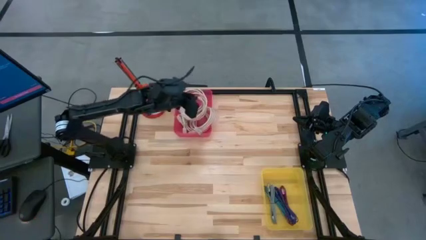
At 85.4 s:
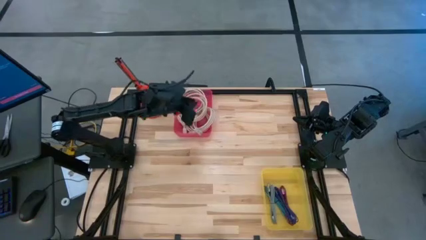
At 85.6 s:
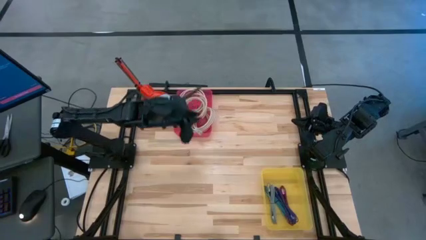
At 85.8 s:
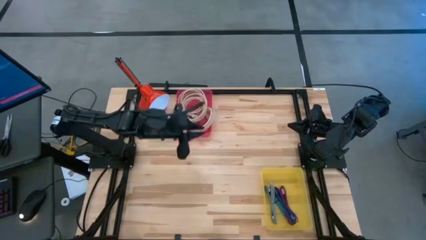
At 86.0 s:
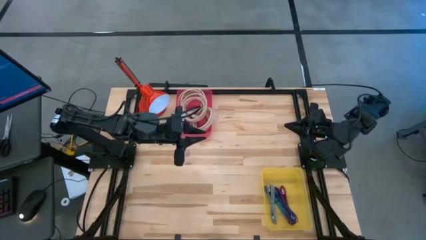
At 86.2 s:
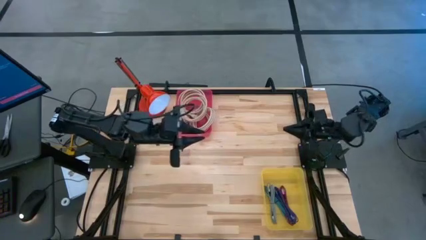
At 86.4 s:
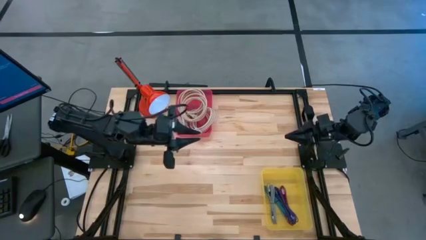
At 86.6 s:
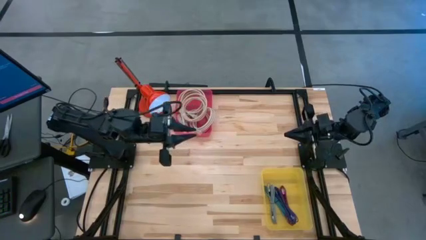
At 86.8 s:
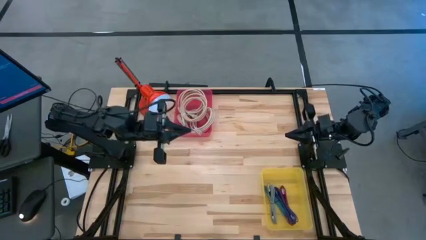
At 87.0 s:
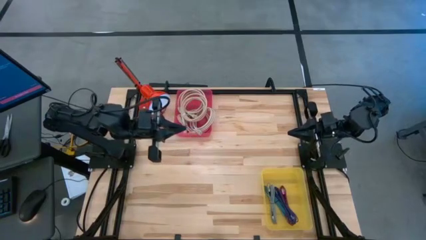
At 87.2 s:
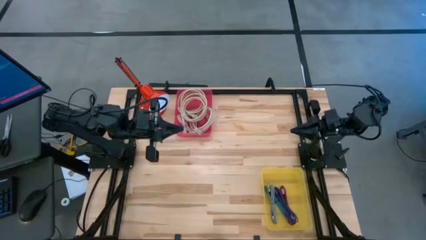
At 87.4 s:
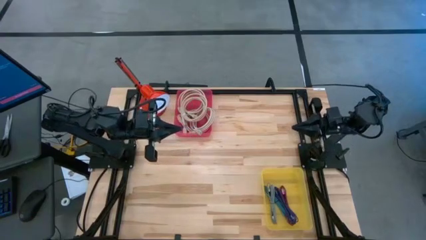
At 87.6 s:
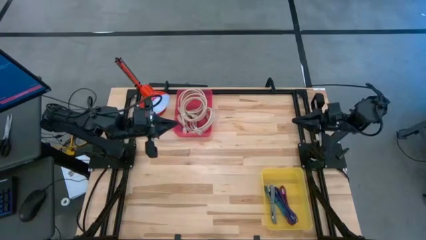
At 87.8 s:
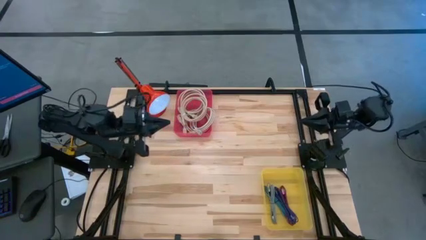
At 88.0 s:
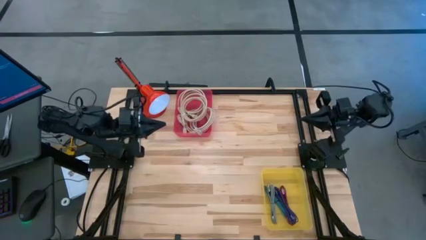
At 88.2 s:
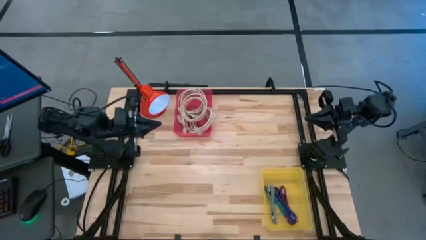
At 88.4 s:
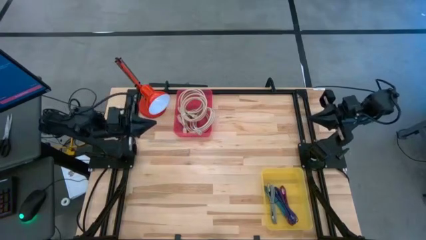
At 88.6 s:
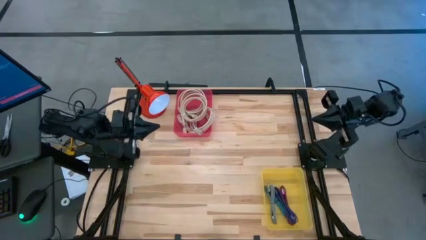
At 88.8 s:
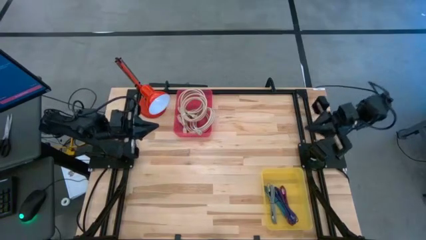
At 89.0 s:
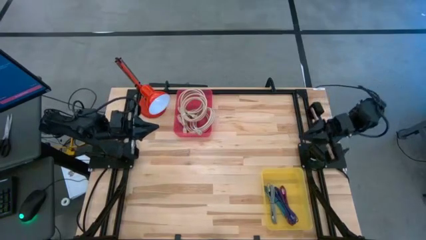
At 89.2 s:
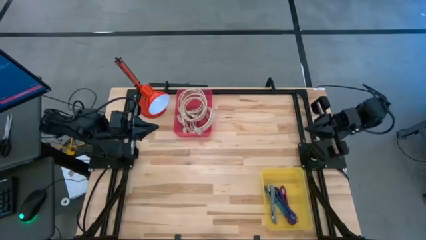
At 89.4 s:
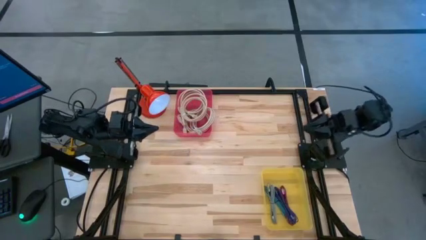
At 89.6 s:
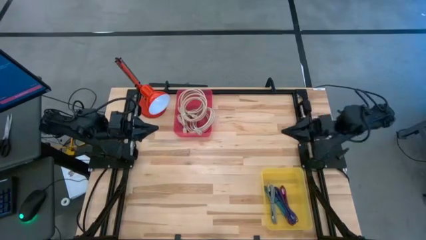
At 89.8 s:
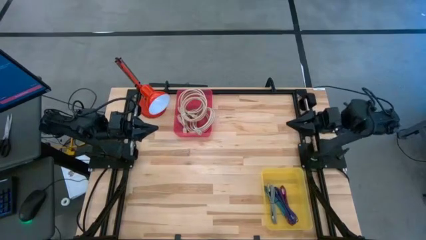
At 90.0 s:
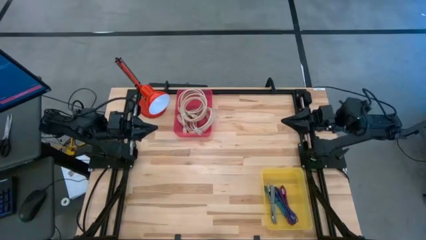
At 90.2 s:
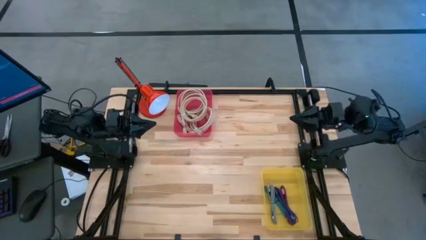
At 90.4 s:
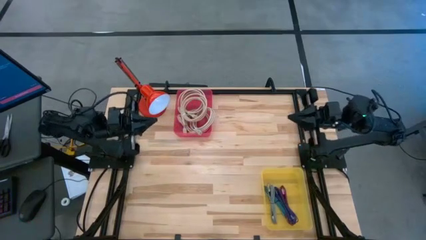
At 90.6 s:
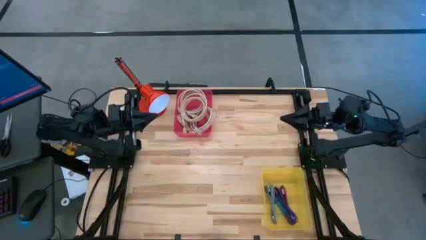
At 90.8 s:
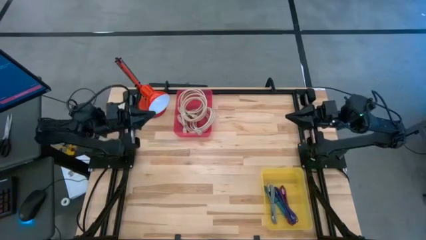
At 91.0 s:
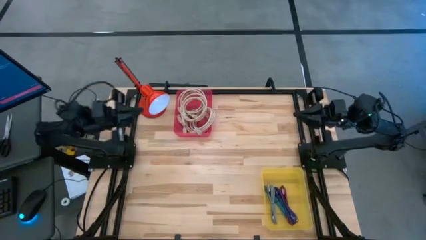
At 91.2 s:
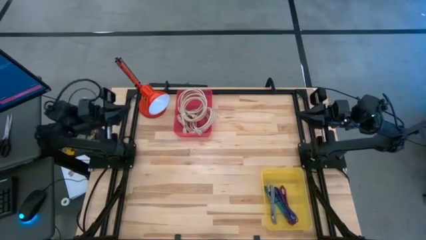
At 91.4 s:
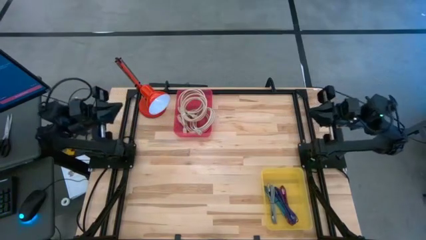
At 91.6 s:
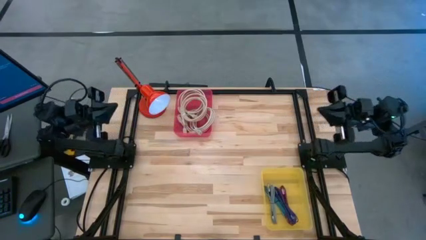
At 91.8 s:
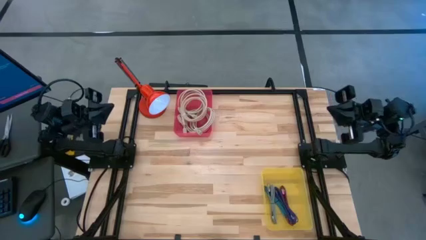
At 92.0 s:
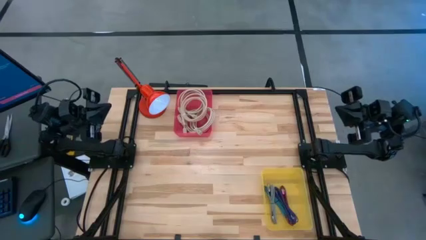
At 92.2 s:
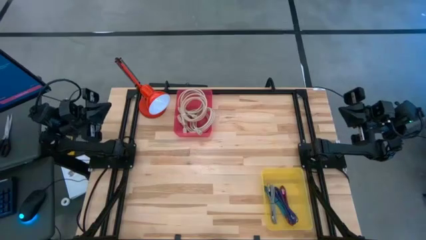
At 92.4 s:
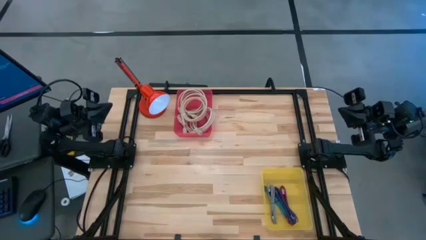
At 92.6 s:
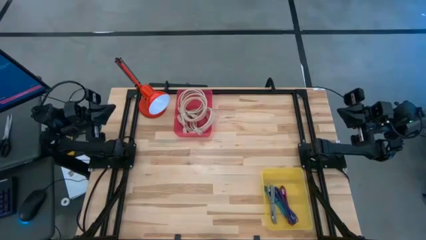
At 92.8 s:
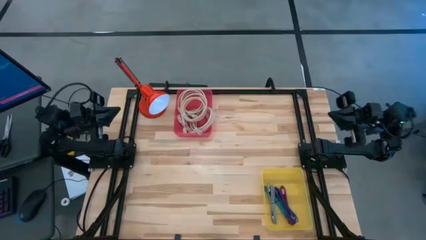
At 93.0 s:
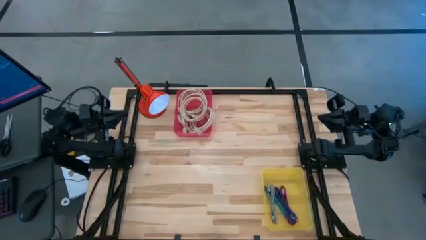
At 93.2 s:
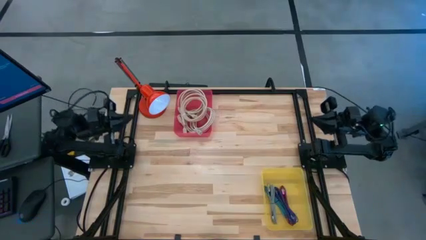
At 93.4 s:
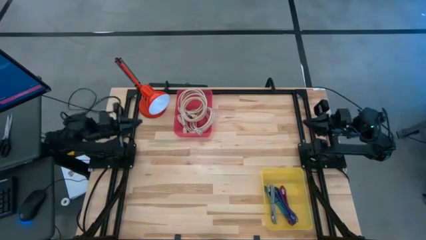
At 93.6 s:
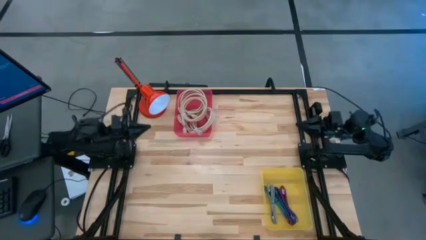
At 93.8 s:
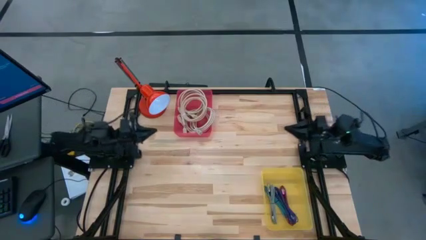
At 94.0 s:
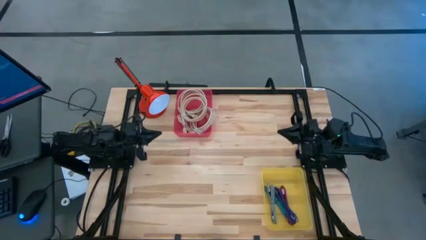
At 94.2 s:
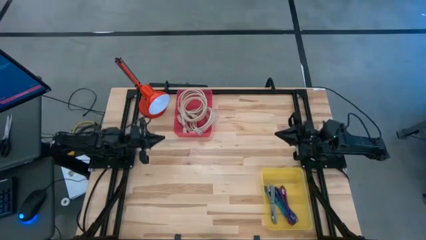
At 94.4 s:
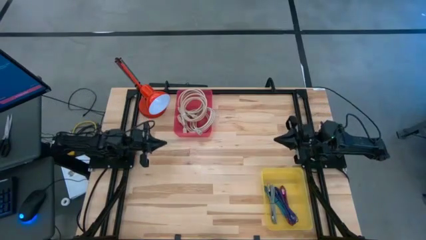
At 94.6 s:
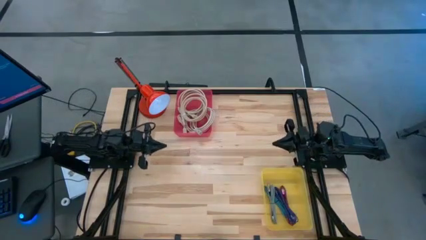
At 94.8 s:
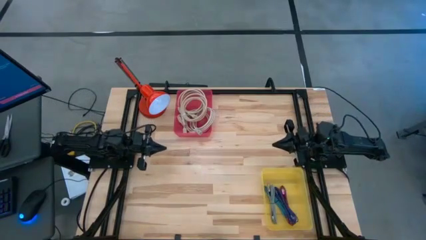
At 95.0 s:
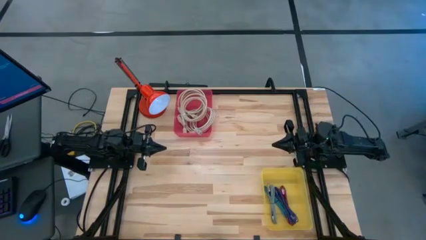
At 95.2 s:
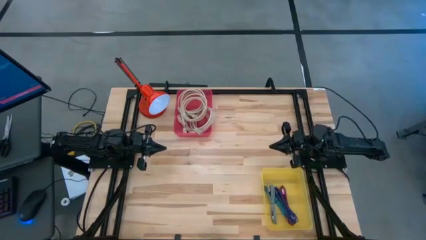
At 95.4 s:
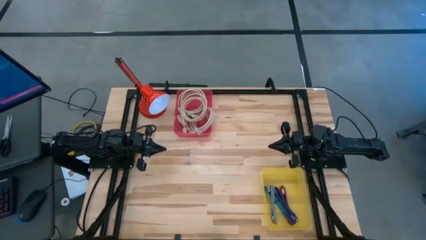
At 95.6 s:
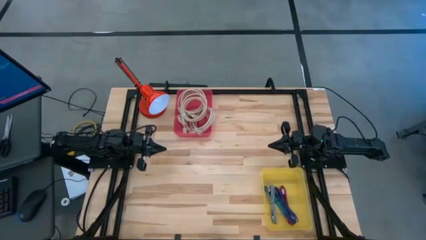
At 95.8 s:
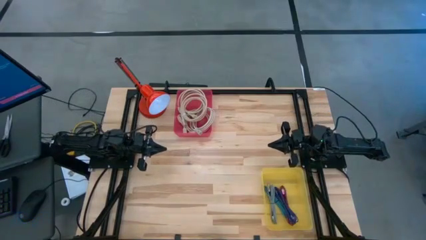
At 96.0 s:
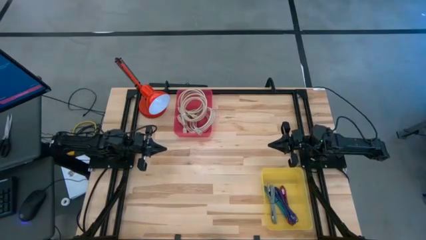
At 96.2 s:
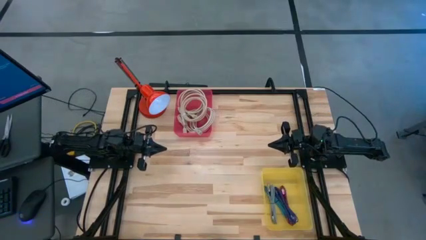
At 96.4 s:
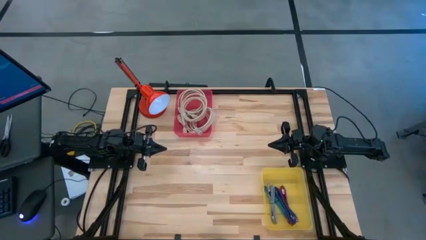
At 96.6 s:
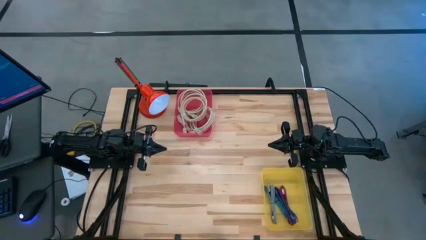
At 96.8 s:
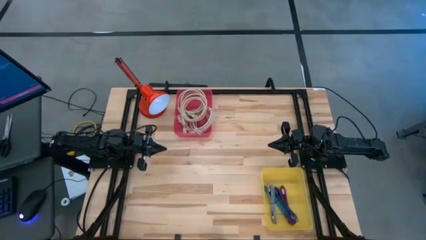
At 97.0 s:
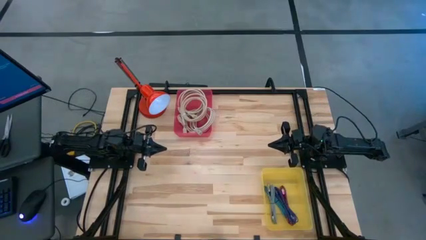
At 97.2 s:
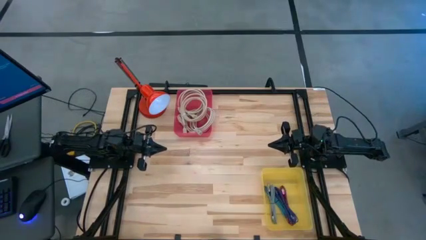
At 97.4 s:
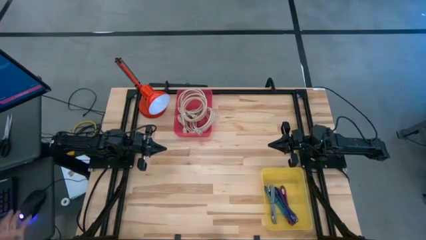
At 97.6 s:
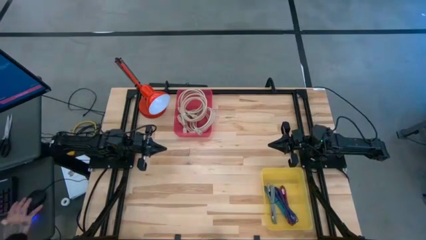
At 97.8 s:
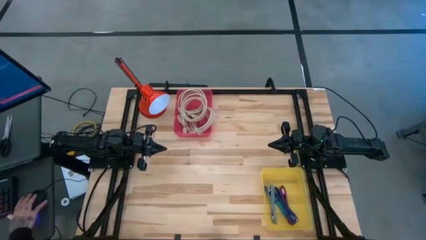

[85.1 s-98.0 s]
Task: Pick & Place USB Port
Return to Home Position
